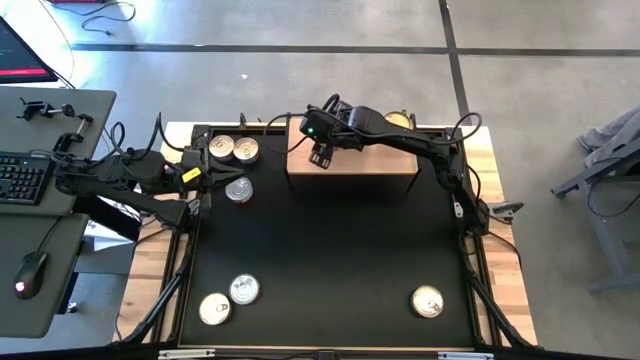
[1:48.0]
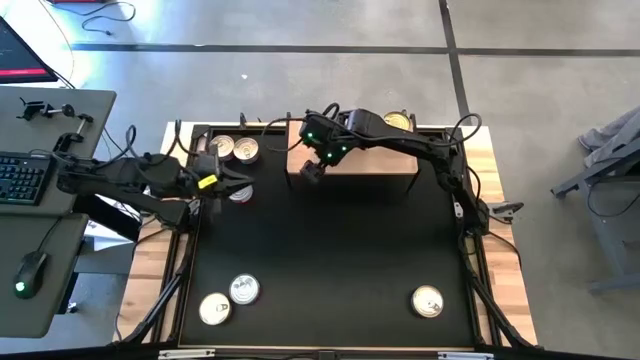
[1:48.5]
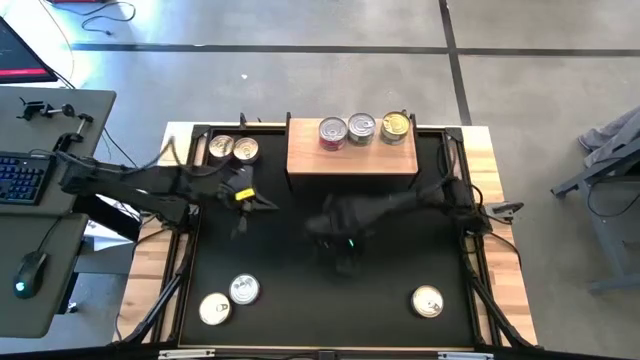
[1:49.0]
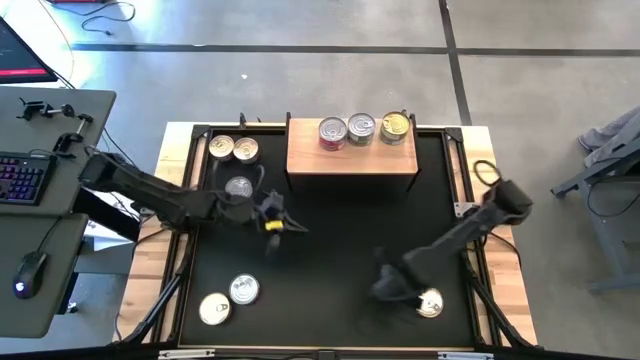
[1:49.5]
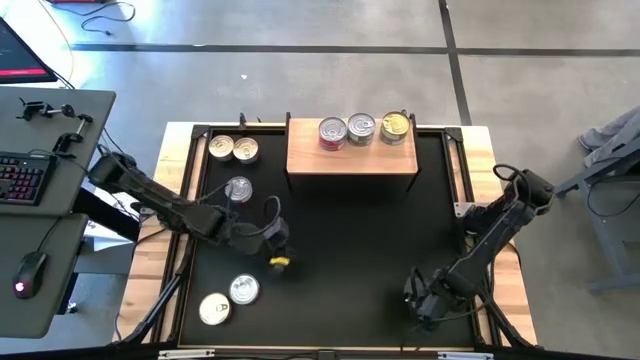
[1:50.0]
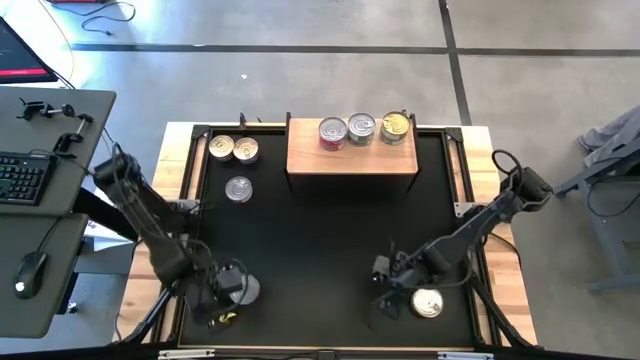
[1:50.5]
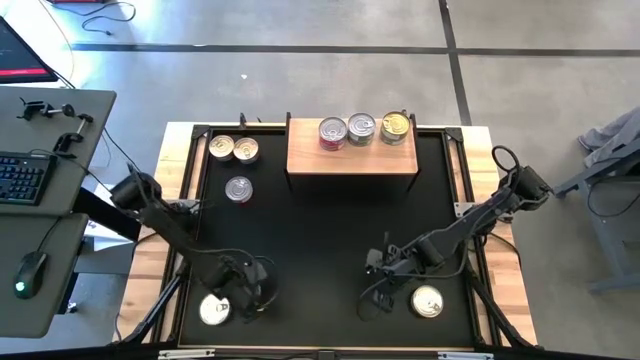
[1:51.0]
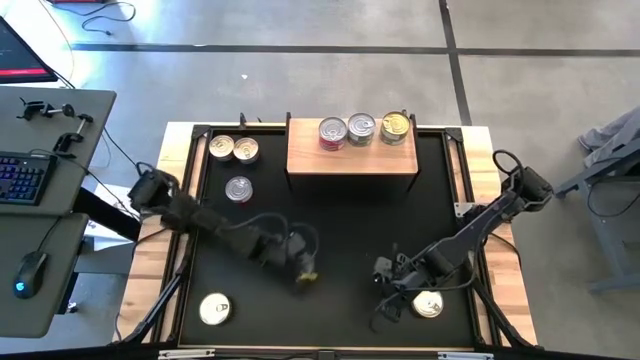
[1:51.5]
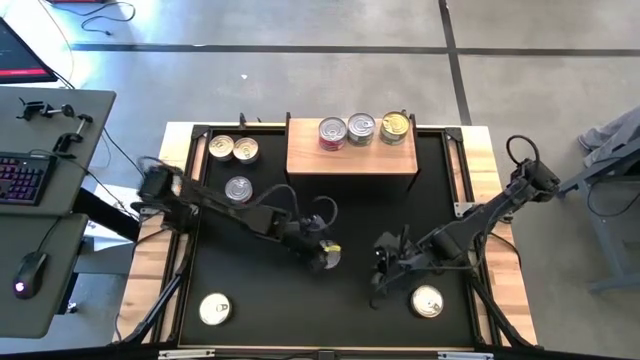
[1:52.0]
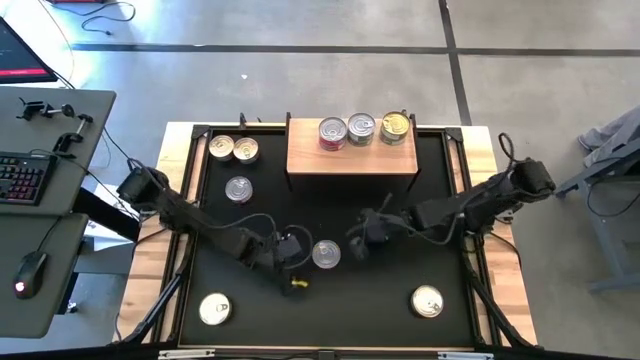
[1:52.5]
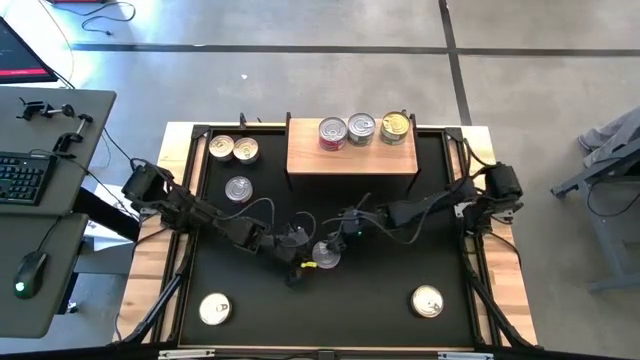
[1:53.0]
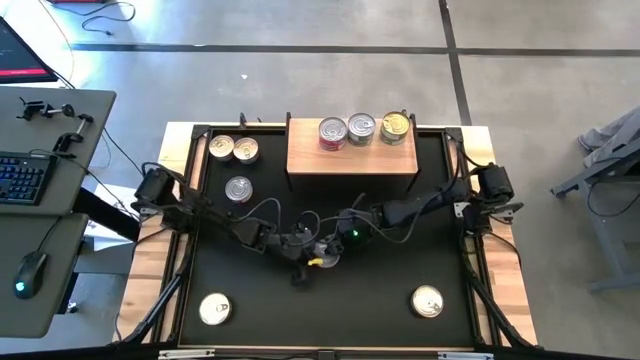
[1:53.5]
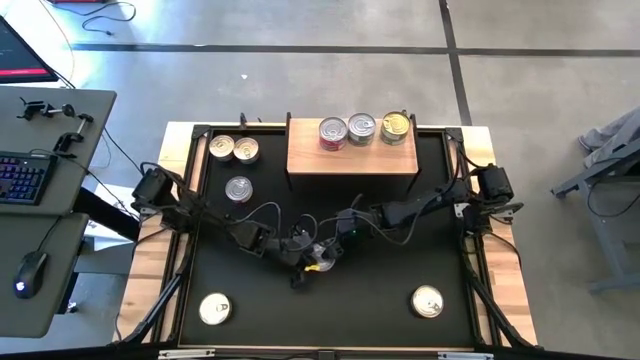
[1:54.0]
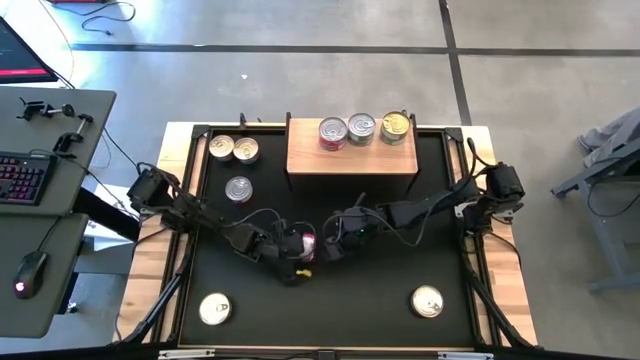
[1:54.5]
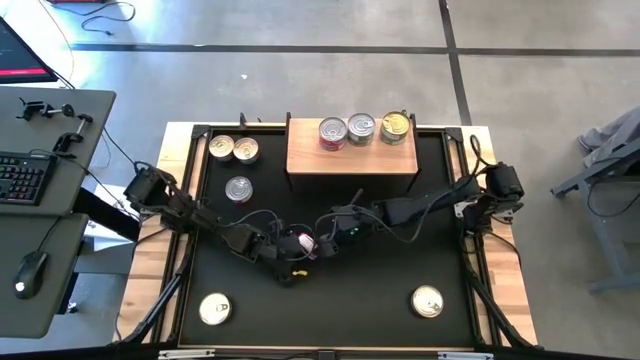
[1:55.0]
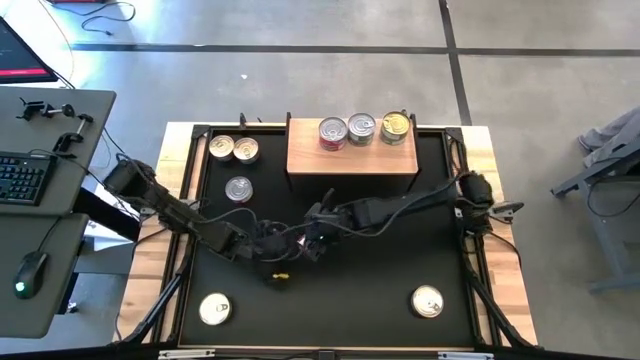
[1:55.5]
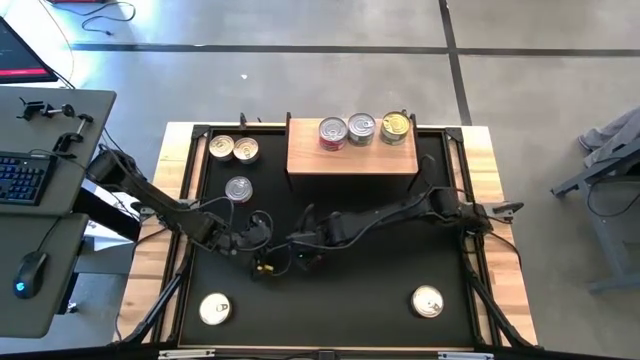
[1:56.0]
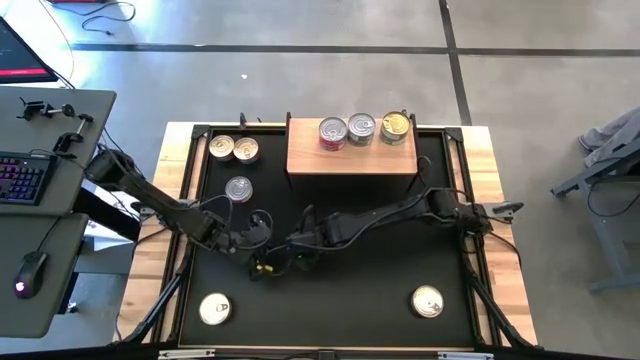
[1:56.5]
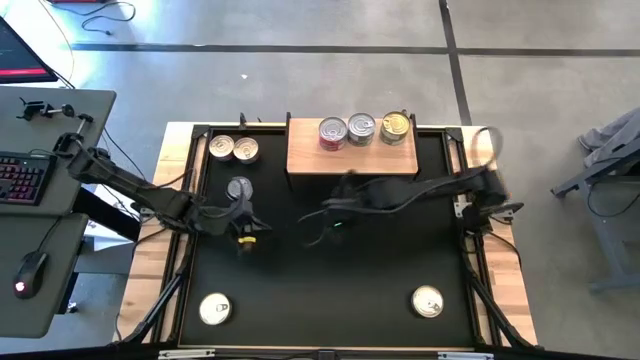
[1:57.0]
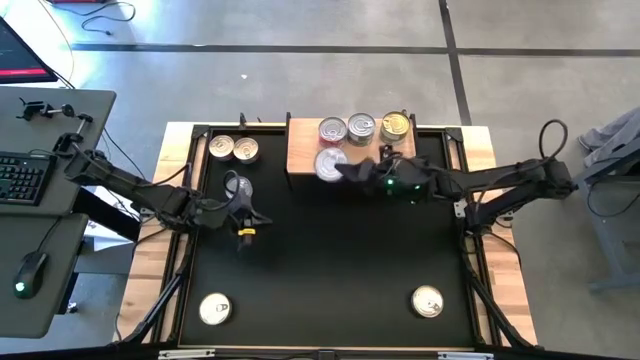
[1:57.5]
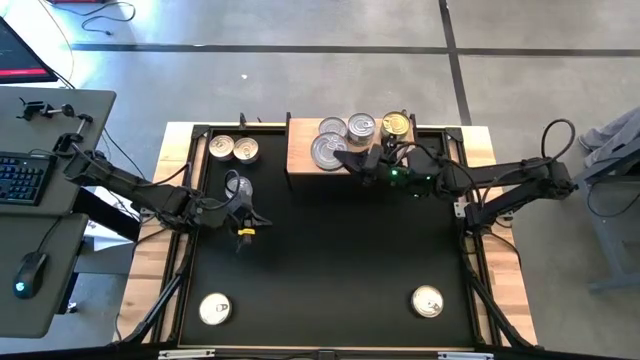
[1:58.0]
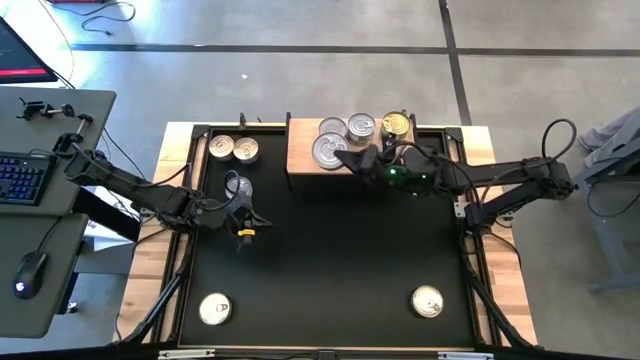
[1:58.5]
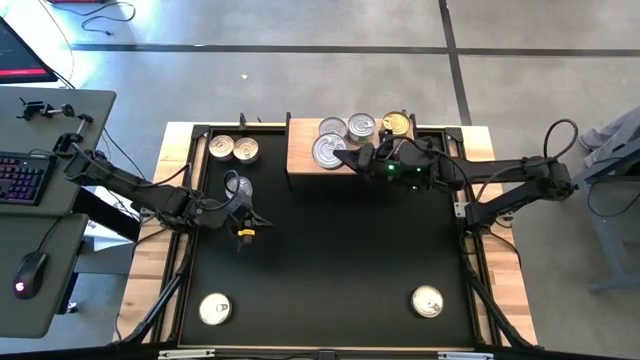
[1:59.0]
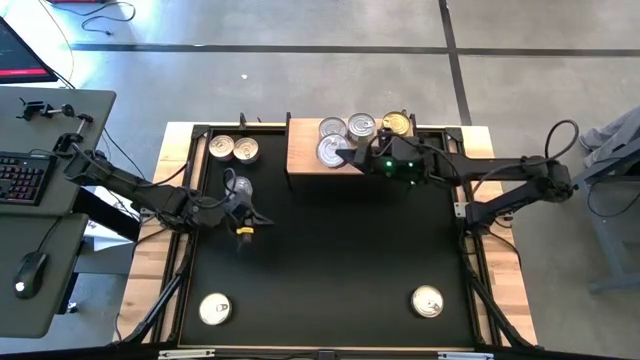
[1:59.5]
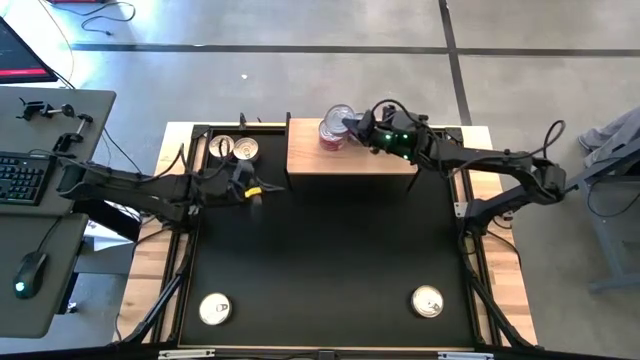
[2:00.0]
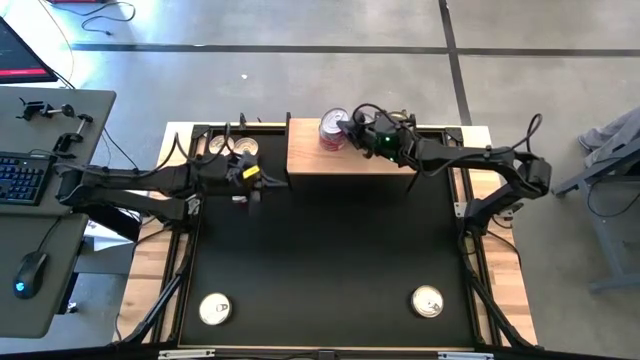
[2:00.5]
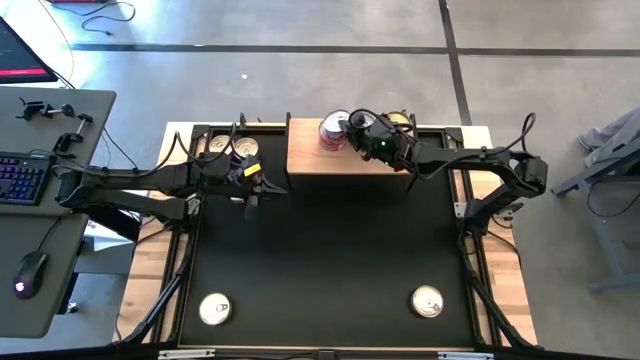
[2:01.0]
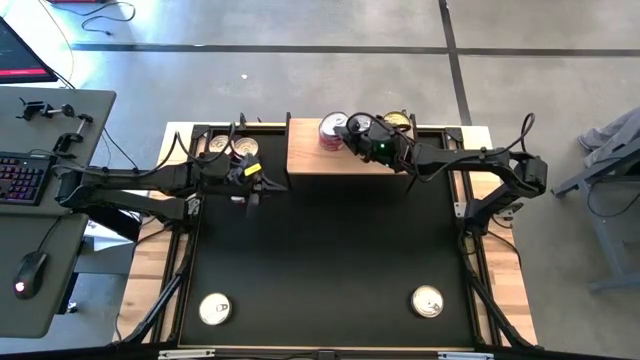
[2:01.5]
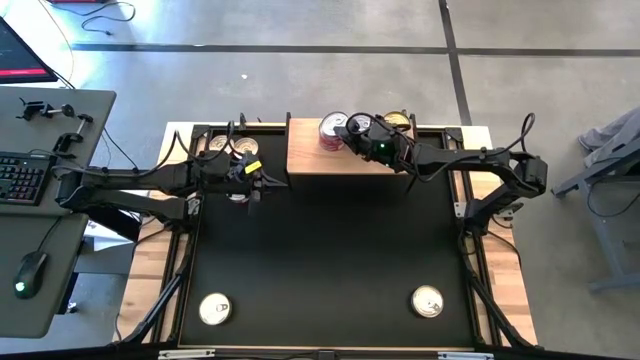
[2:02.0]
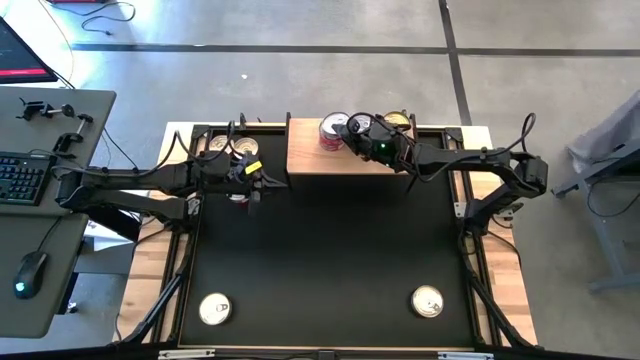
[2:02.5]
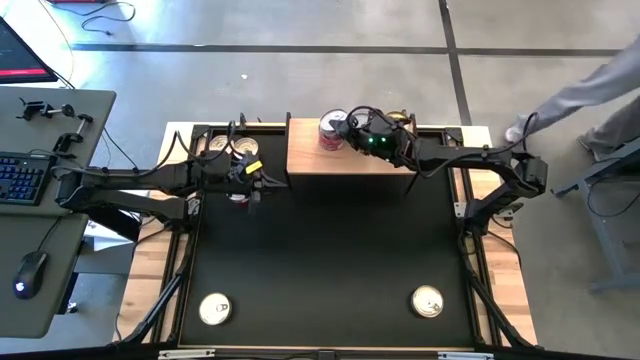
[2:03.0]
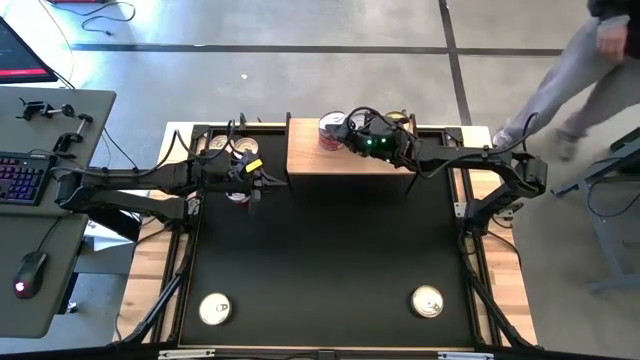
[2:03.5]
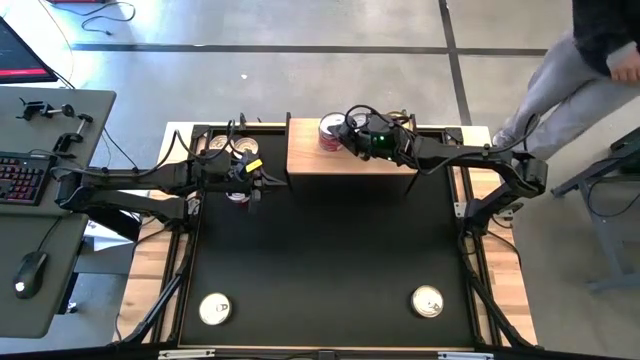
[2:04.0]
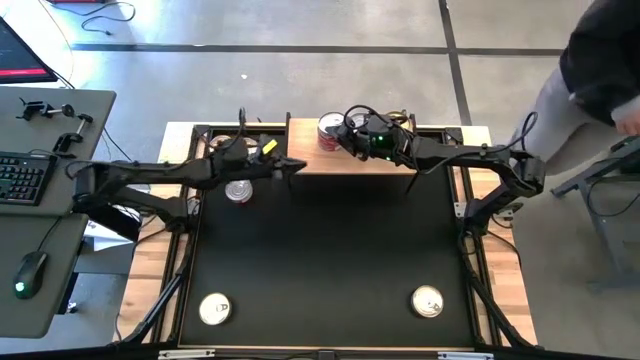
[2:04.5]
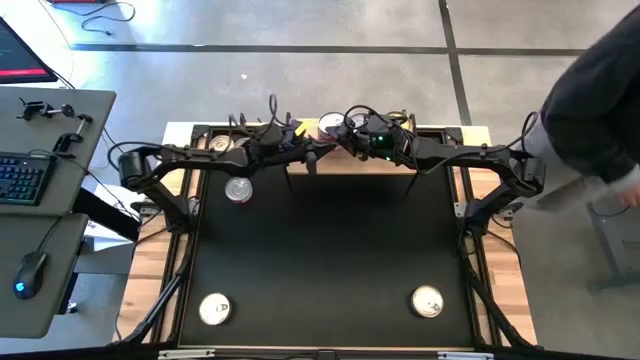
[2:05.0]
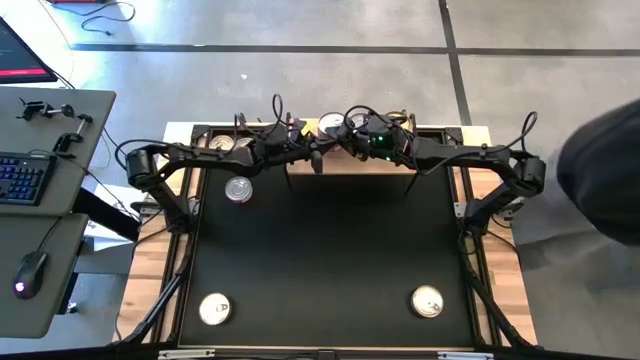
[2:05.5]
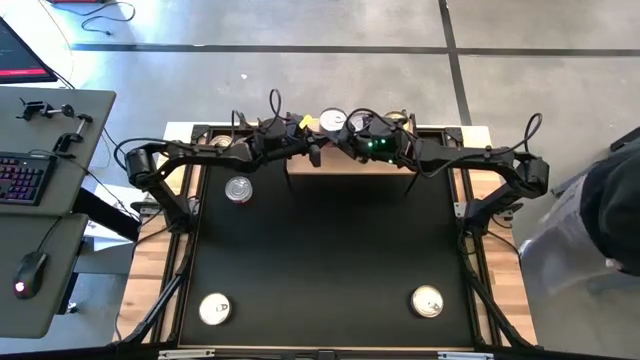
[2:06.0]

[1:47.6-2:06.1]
Task: Stack canned seafood by type on shelf
Stack the red tuna can on top of the red tuna can on the shelf
